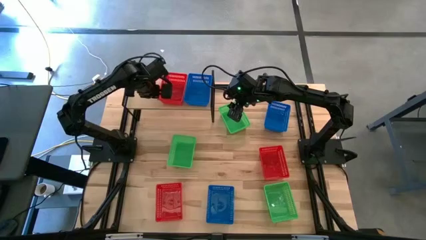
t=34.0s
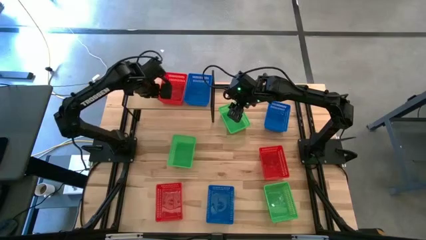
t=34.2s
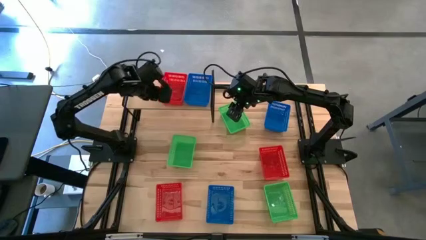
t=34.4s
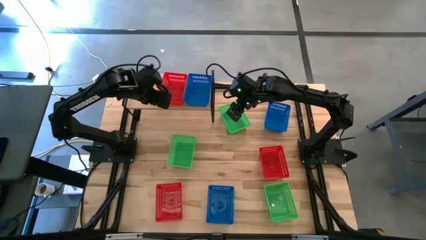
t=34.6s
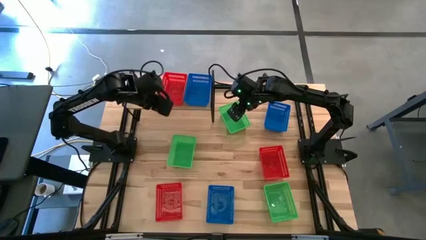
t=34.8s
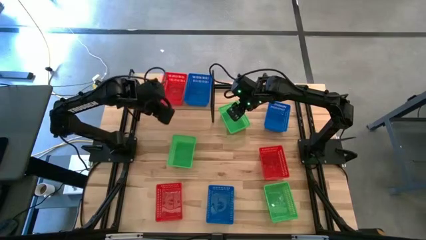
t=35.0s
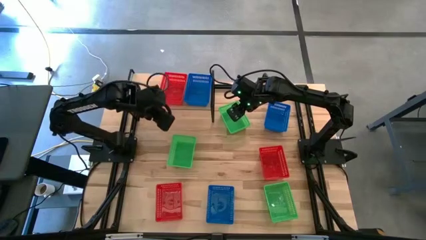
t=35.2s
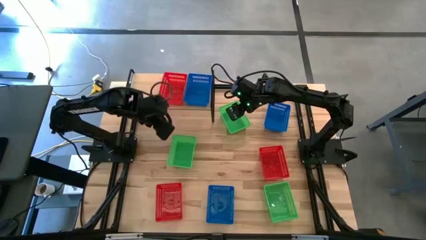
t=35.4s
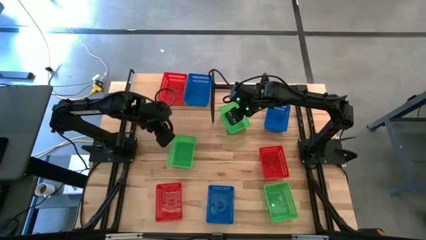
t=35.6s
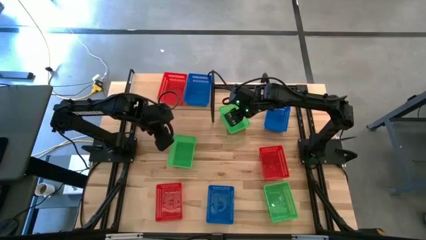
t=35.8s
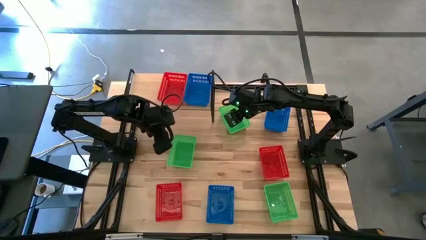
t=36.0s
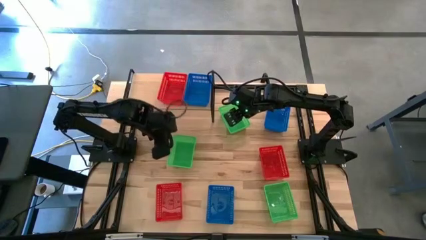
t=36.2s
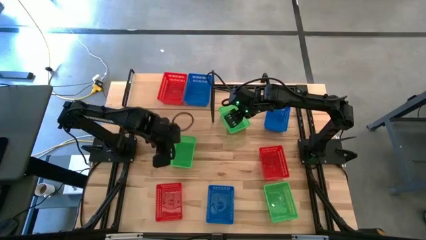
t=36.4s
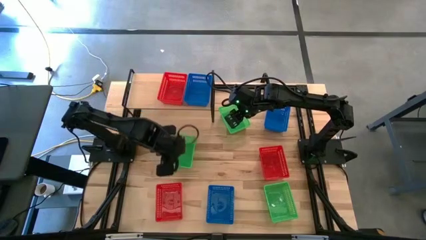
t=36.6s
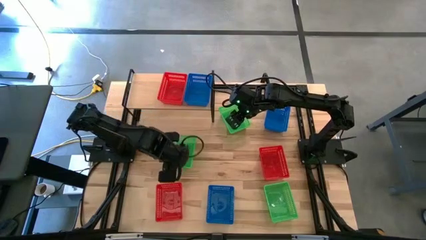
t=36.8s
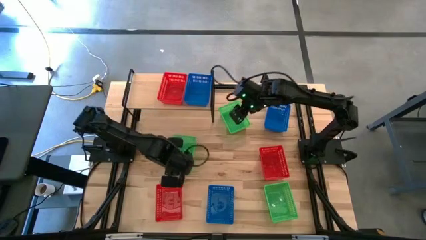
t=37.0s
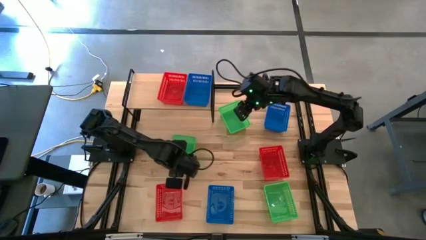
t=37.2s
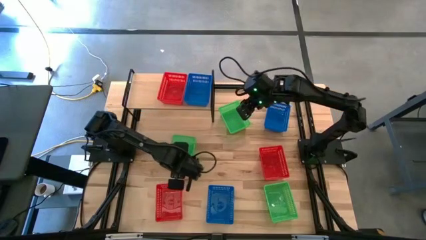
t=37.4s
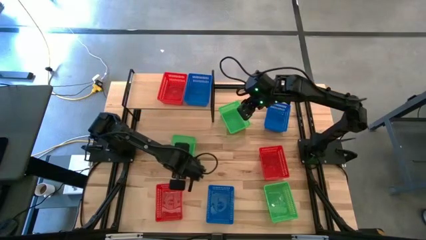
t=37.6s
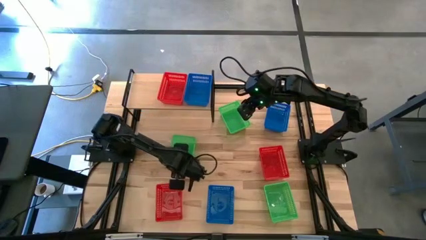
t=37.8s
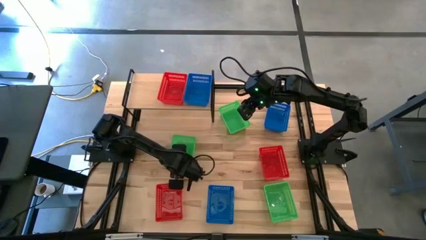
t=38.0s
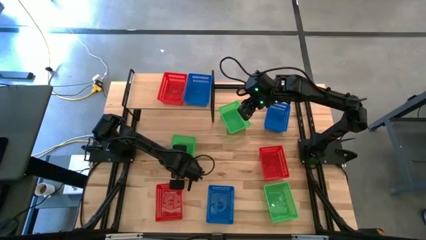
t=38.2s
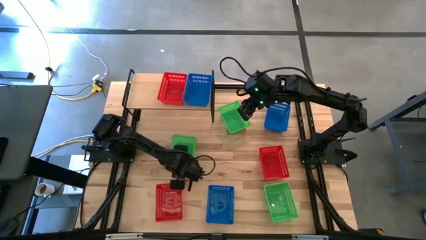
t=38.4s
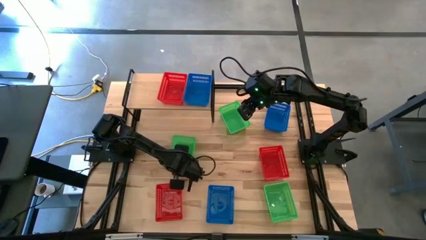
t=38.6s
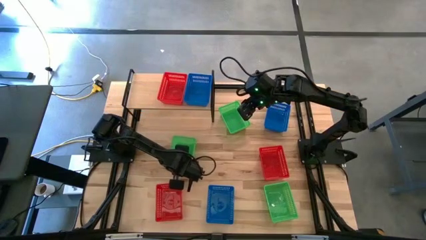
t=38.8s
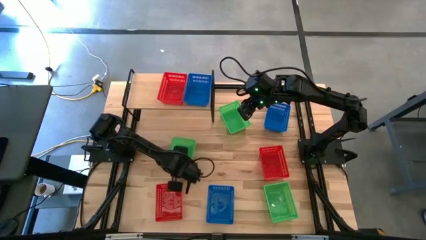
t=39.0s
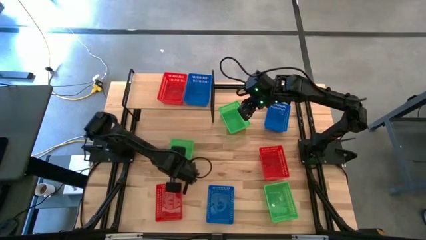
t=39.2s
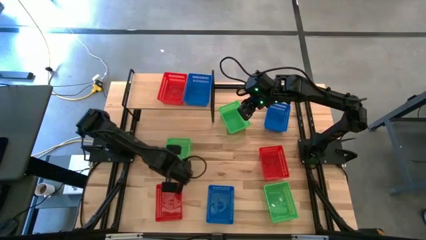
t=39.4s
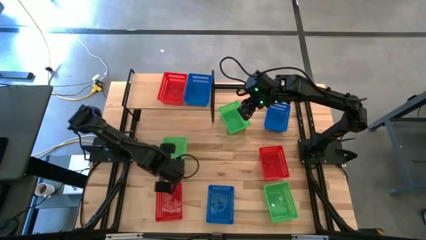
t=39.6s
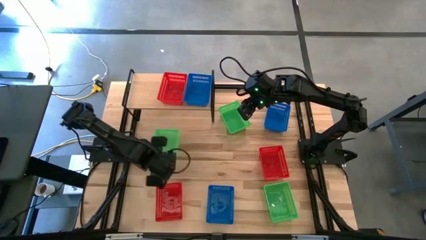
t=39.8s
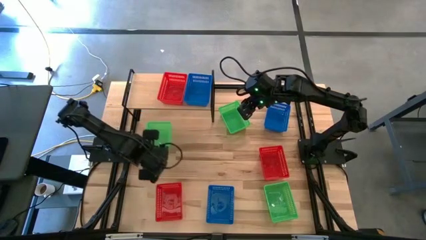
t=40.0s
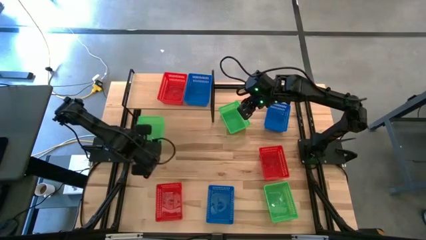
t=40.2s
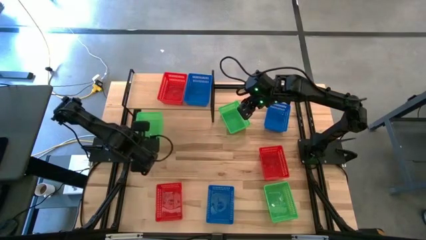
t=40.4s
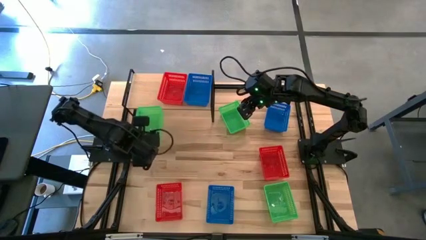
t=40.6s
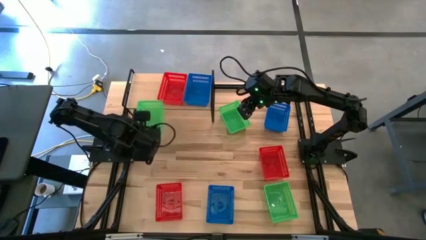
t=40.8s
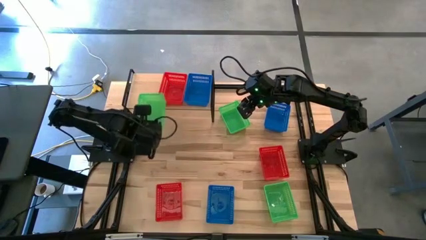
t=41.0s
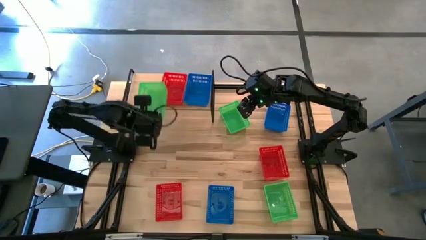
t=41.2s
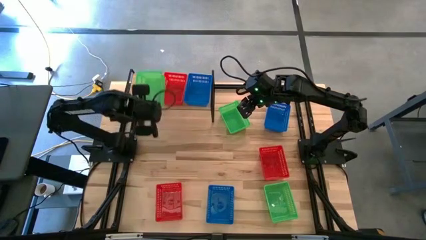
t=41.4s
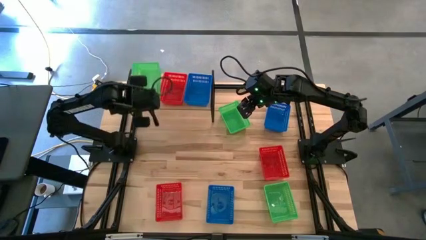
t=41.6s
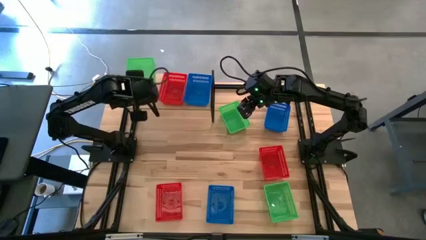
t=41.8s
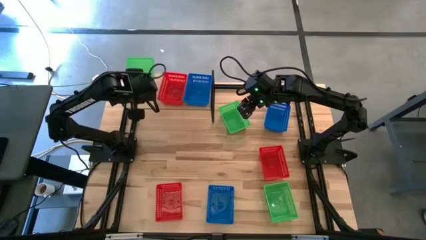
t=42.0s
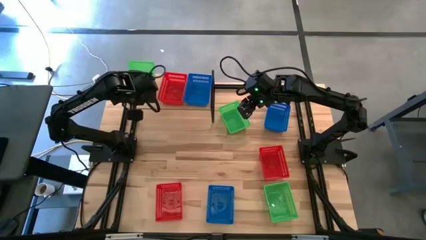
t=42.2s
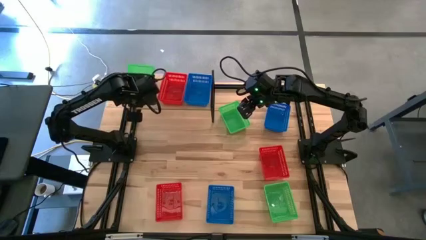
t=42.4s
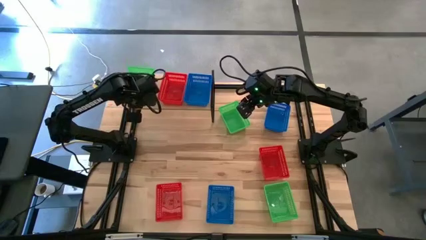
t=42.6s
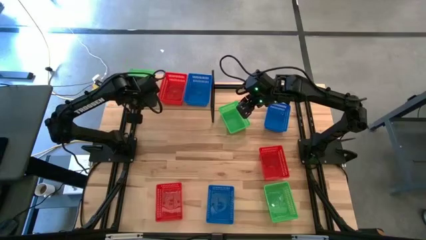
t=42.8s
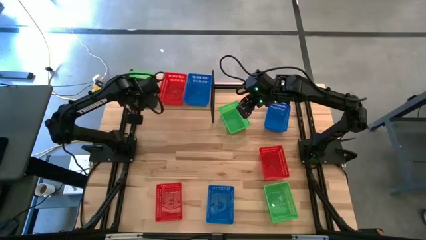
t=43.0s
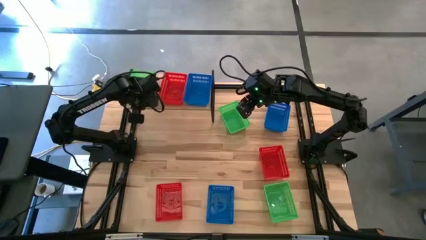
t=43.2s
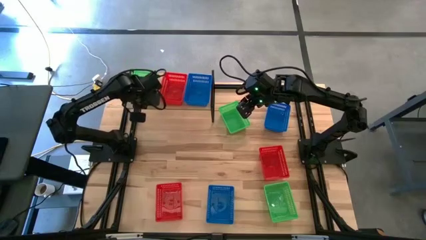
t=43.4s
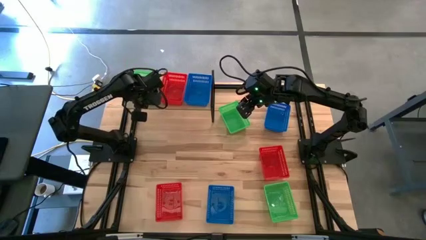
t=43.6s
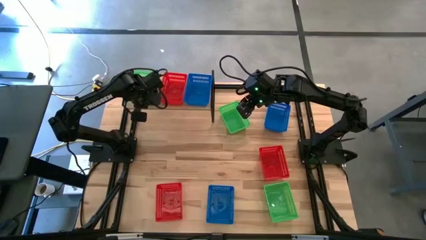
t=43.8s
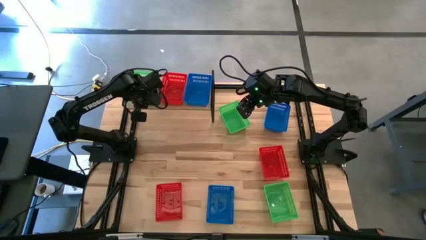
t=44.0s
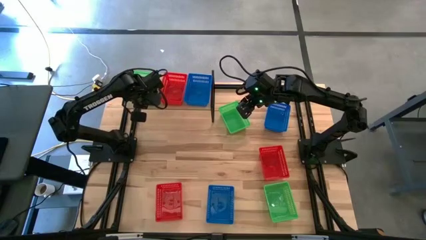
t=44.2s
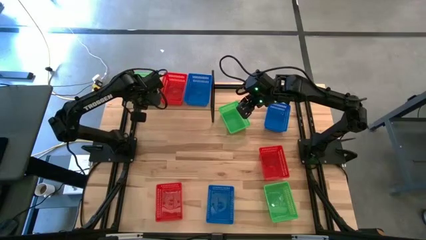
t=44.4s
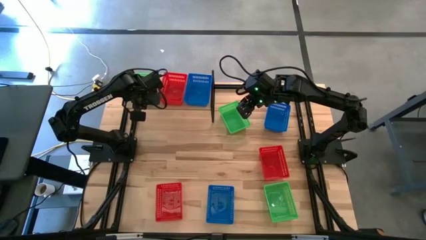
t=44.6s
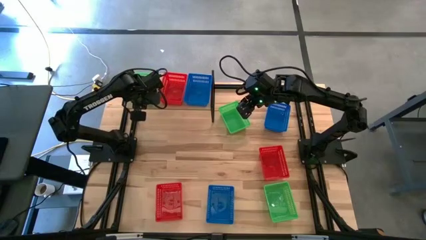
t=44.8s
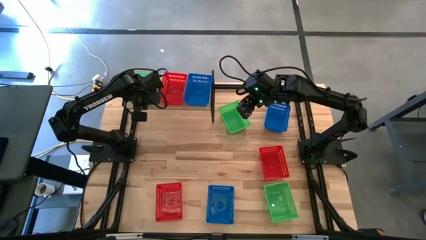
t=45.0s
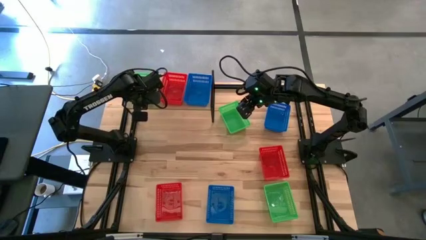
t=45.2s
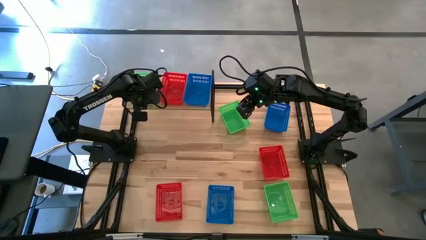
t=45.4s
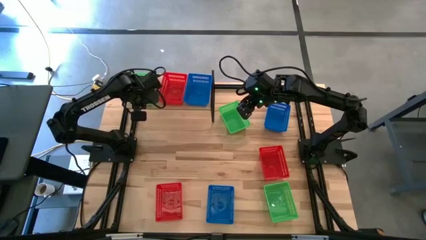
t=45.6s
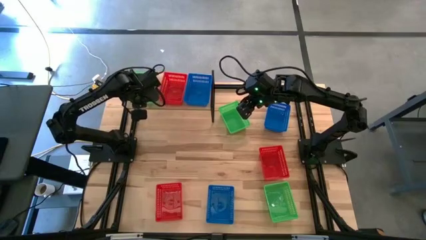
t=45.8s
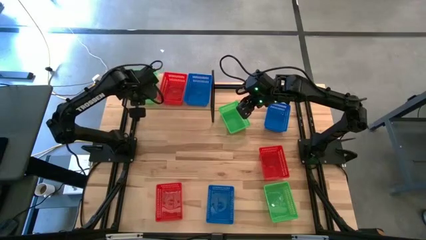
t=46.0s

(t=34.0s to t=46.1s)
Task: Stack baskets on shelf by color
Put the middle left green basket on the shelf
